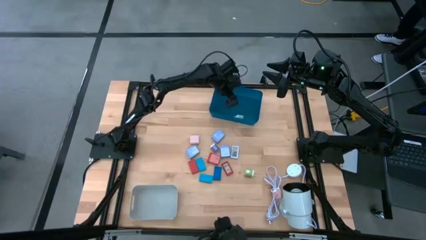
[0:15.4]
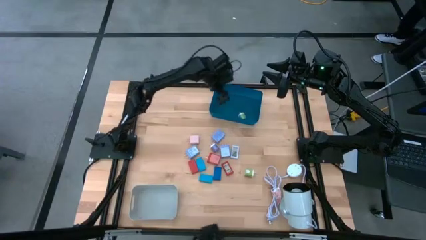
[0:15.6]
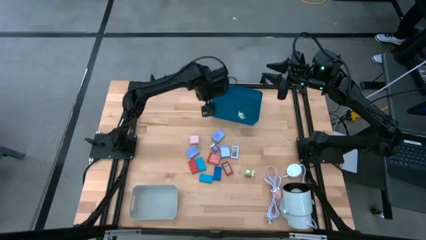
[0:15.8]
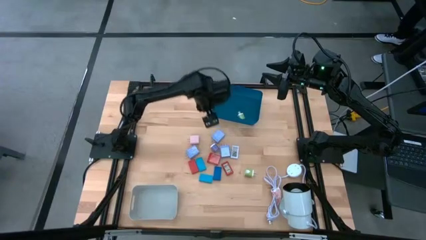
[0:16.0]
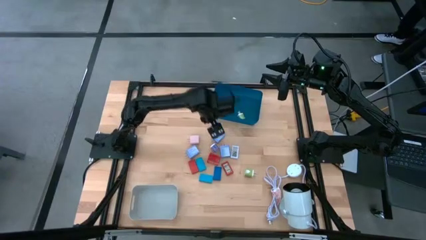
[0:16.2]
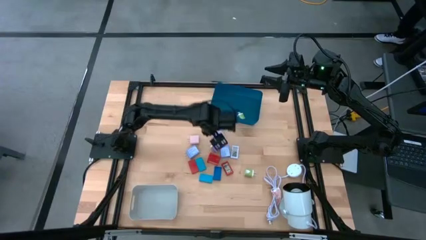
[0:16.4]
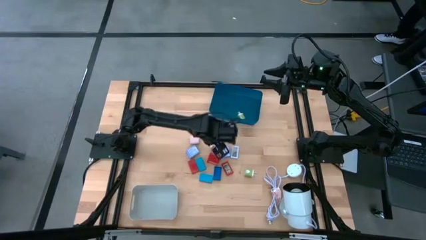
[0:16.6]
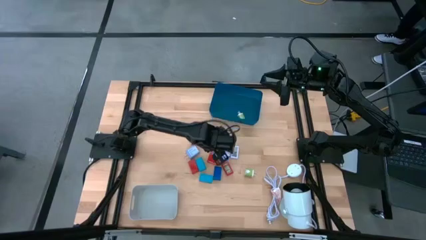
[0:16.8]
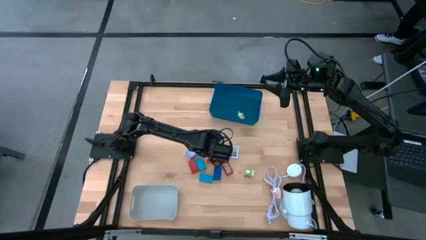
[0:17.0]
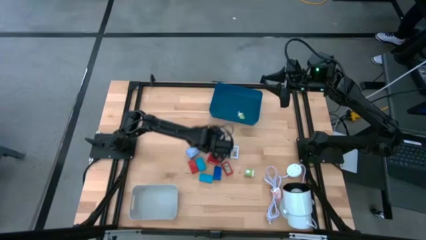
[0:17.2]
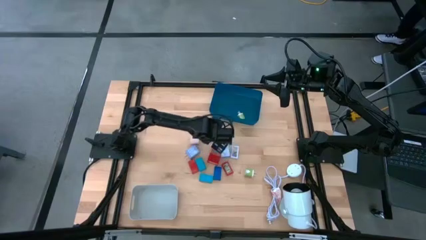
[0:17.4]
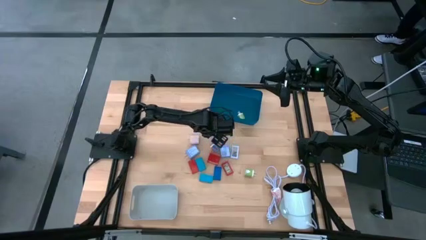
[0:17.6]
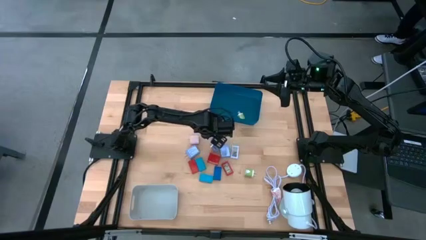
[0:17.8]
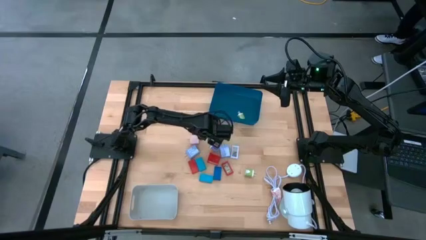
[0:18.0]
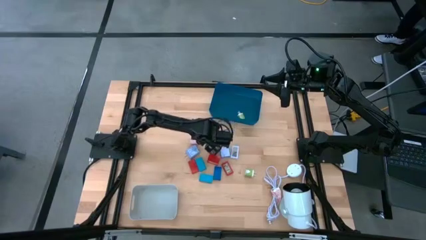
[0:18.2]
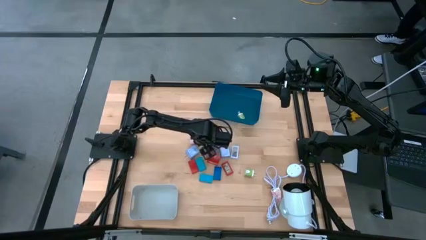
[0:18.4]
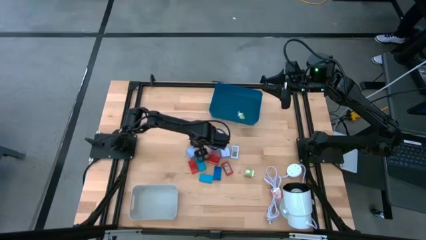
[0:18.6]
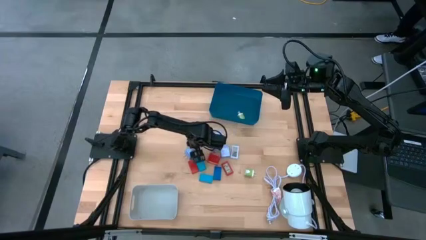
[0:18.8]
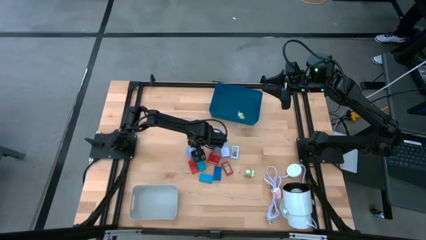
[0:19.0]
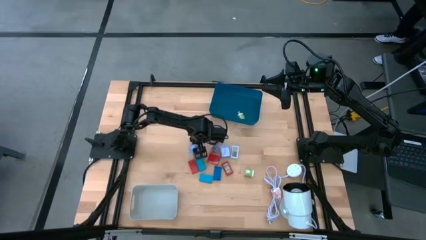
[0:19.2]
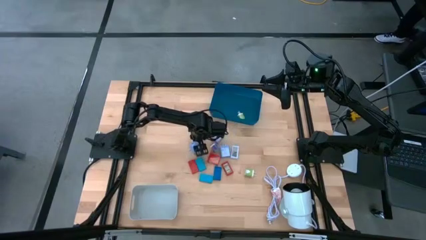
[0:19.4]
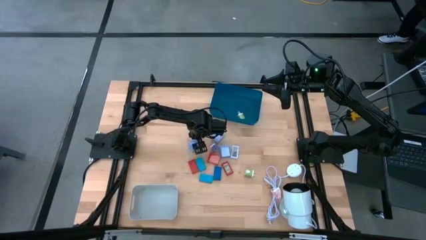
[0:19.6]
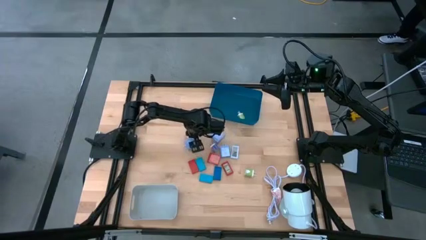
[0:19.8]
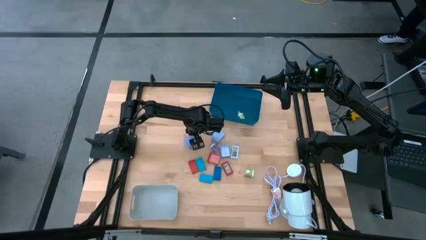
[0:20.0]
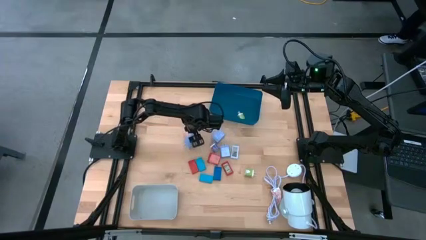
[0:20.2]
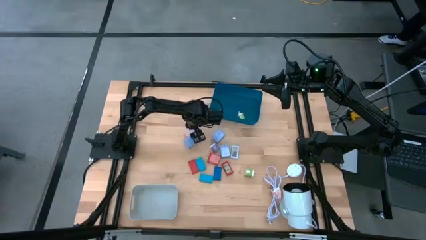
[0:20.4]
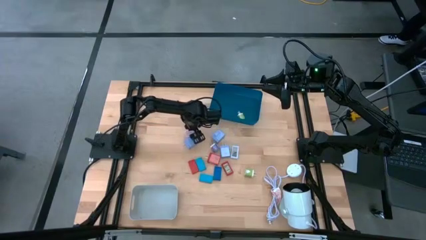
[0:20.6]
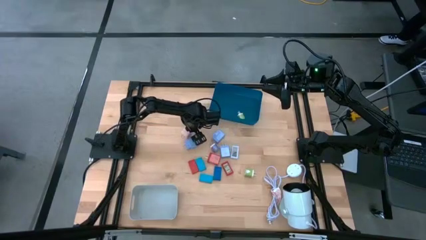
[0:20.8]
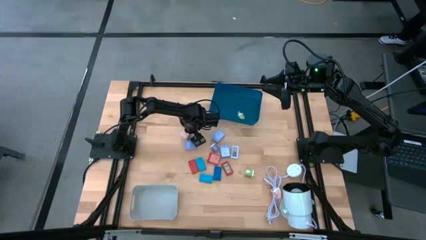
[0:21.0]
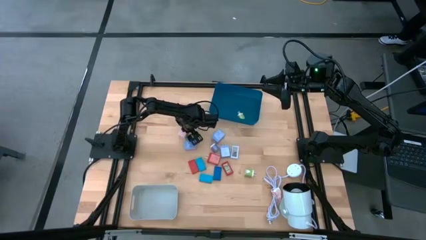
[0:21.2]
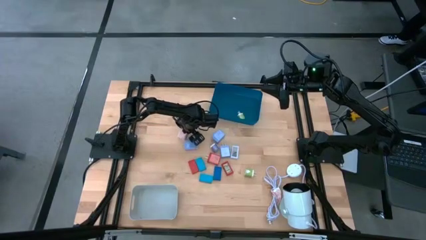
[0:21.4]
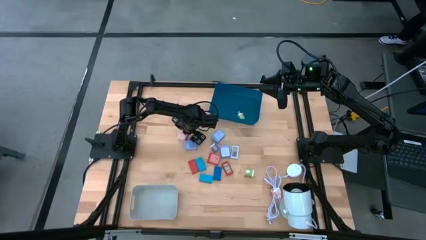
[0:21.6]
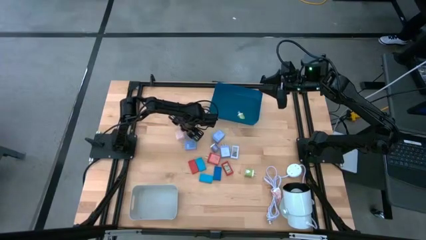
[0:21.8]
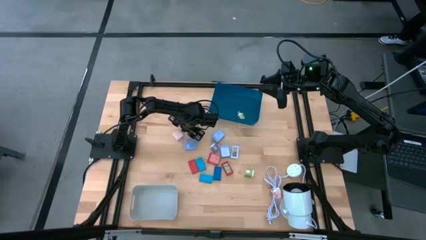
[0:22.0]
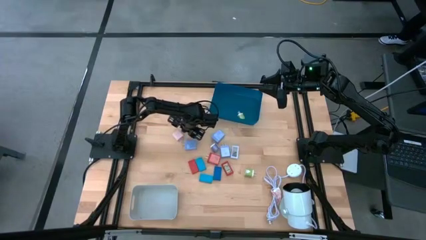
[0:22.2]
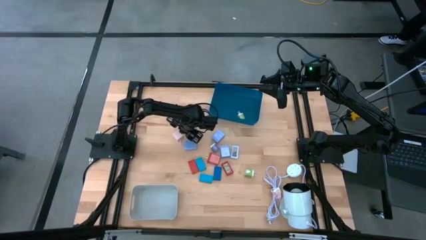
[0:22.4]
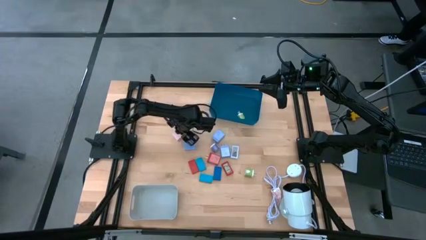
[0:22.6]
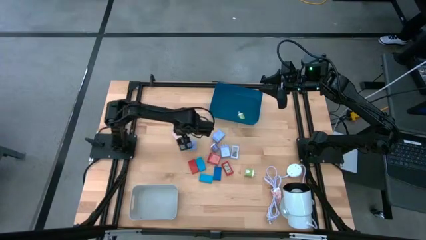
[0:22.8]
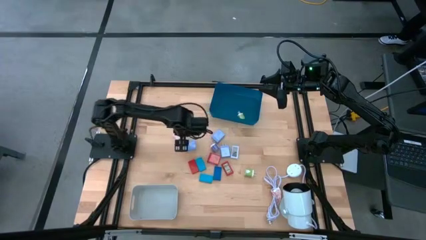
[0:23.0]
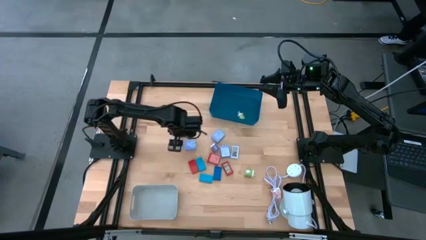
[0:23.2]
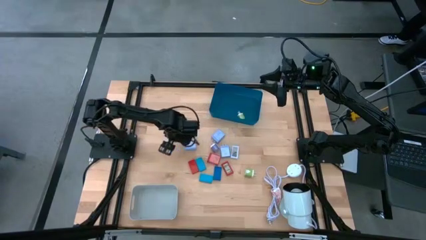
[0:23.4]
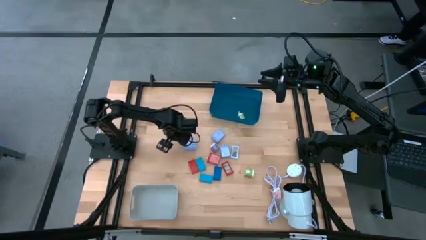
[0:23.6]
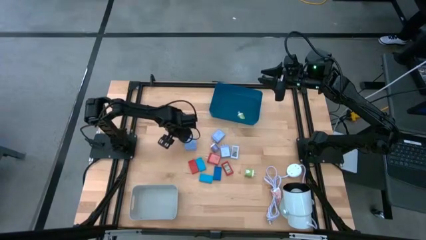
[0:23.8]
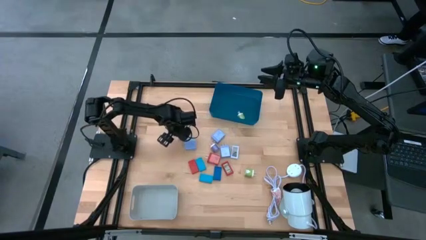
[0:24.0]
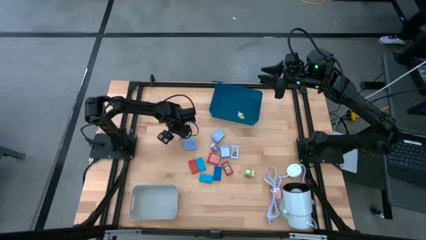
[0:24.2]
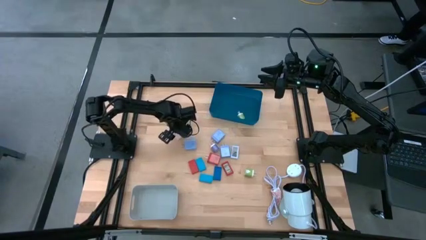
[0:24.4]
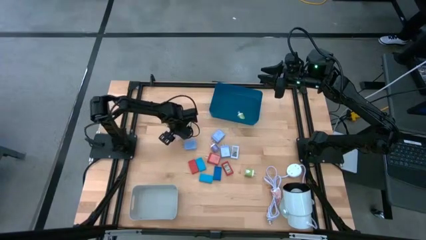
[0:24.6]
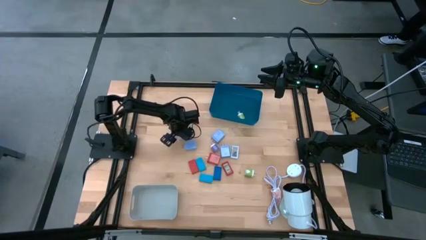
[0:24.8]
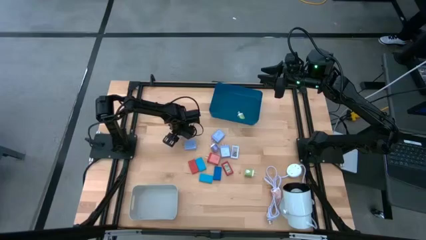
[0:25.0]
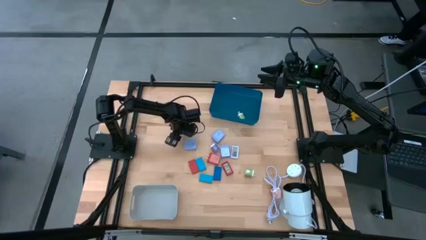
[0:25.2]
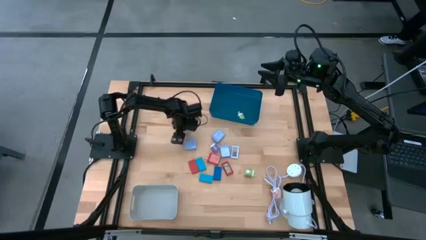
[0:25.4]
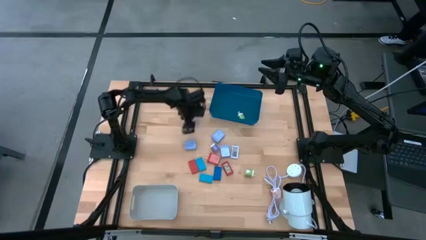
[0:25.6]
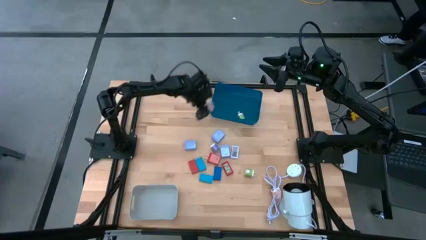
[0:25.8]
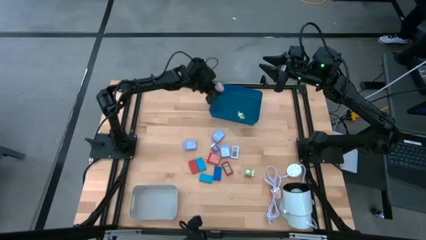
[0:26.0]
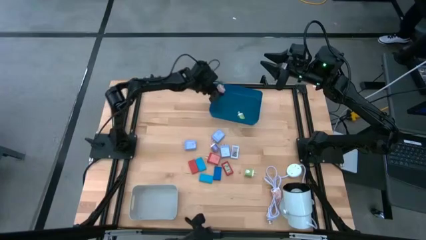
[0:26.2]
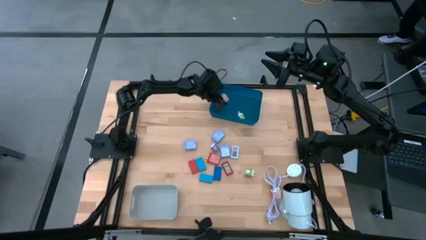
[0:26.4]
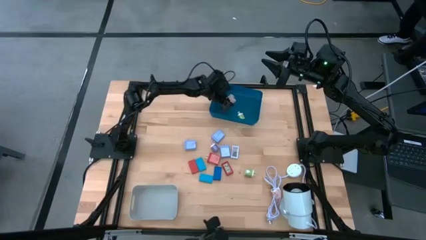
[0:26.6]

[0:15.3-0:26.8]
Task: Pick & Place Office items
Put the white charger adapter into the blue bin

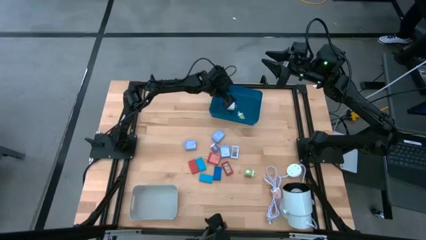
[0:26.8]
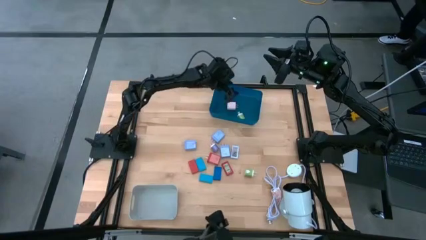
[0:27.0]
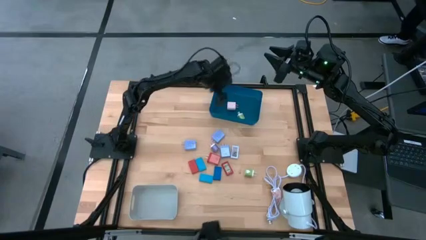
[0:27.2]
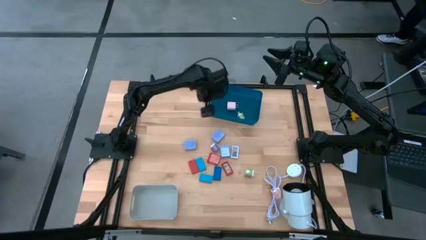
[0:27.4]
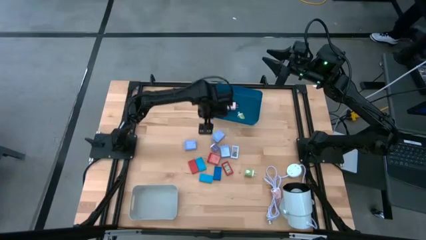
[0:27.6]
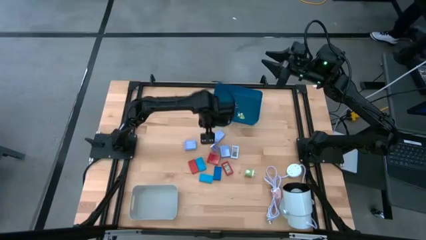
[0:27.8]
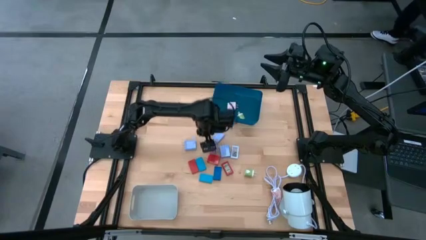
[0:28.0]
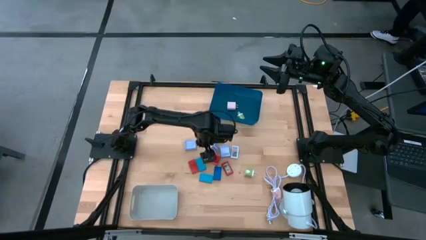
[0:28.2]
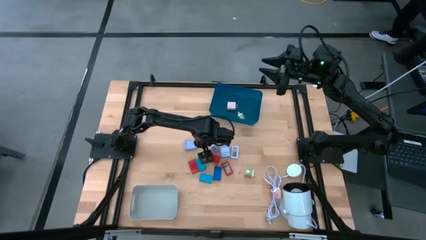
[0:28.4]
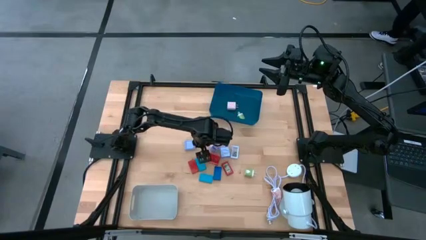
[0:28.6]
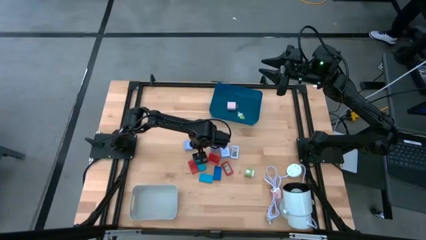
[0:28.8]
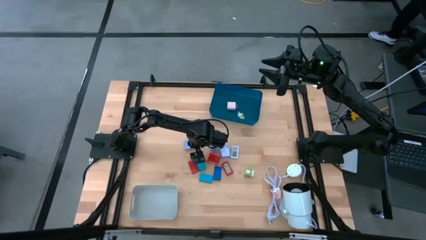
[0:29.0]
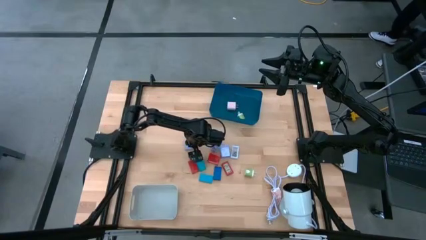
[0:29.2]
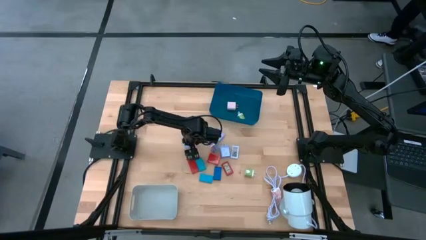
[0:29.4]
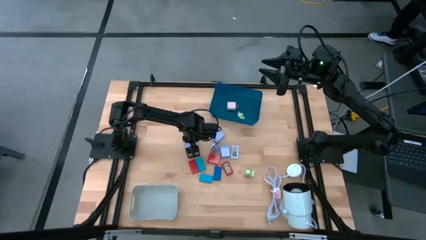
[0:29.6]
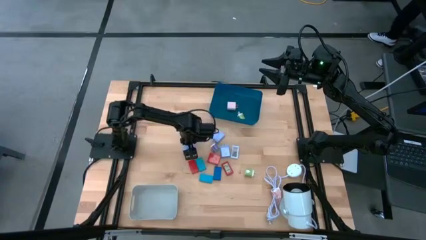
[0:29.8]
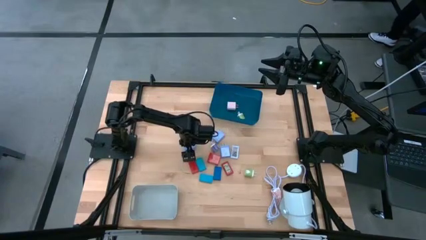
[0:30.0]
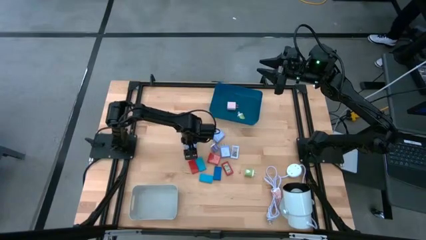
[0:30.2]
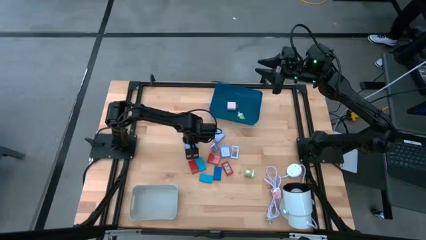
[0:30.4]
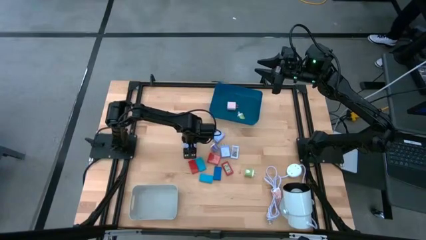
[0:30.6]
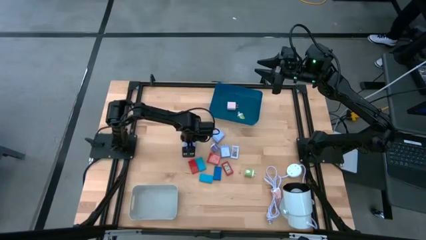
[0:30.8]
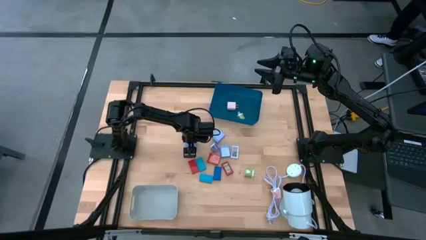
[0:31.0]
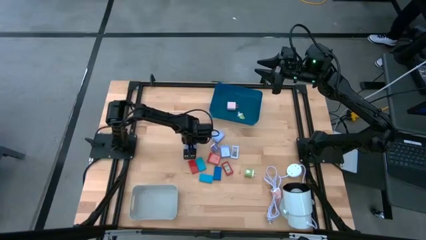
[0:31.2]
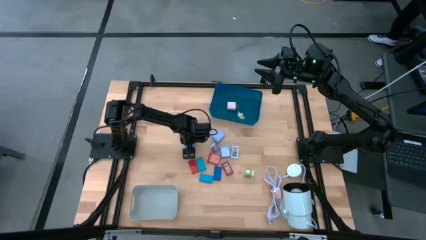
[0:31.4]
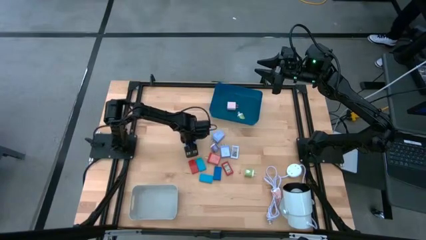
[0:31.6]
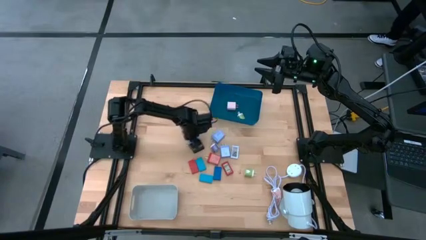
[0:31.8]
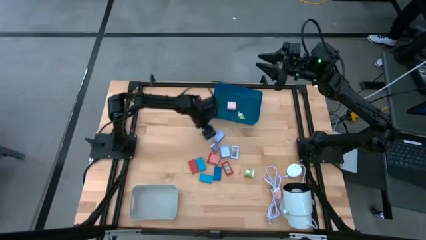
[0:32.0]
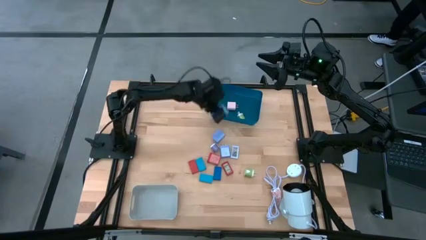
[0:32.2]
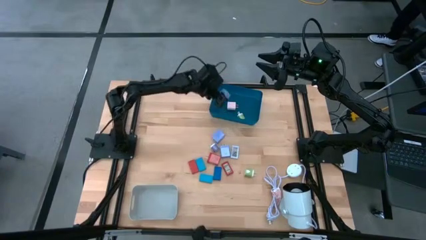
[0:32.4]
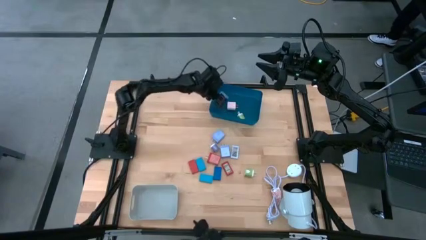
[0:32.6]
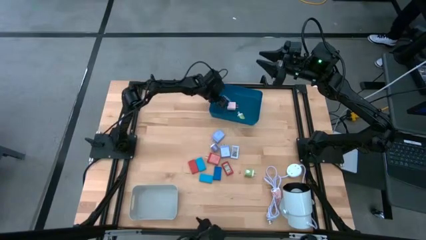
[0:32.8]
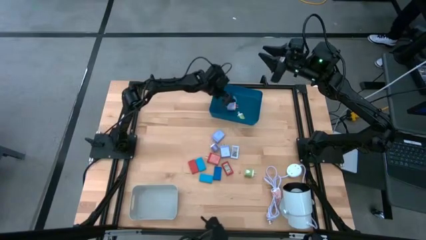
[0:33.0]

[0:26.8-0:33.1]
Put the bottom left light blue charger adapter into the blue bin
